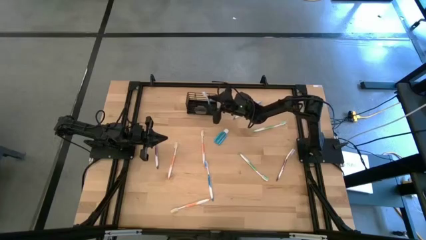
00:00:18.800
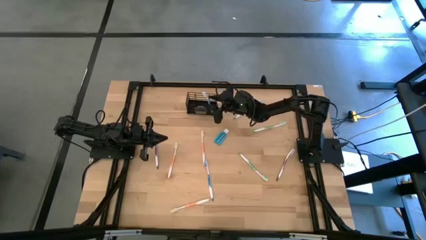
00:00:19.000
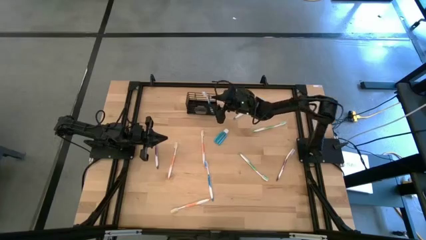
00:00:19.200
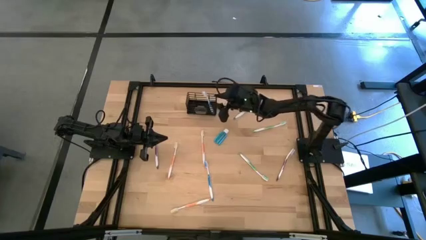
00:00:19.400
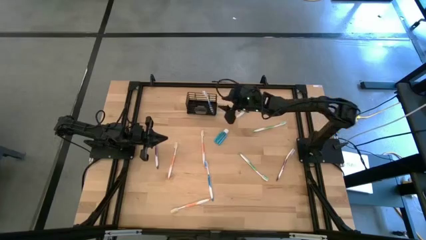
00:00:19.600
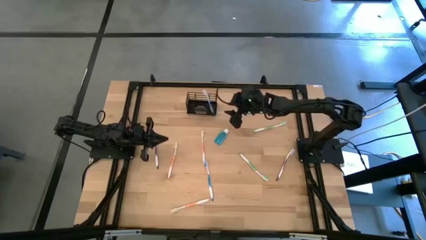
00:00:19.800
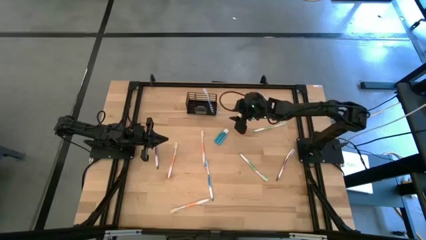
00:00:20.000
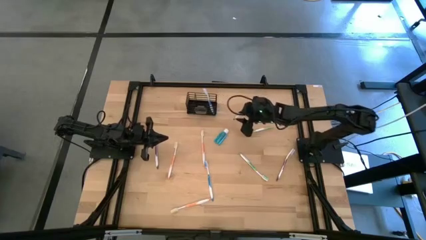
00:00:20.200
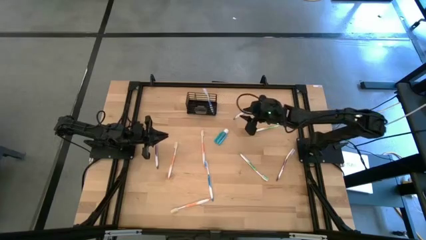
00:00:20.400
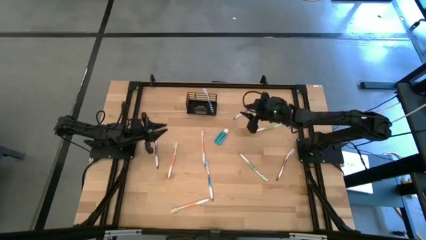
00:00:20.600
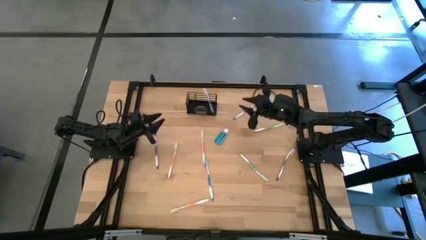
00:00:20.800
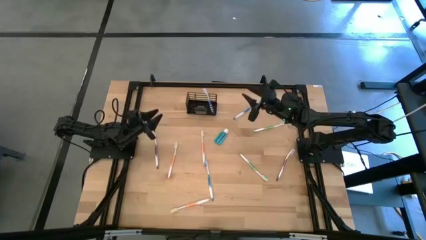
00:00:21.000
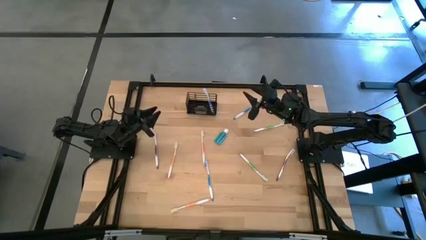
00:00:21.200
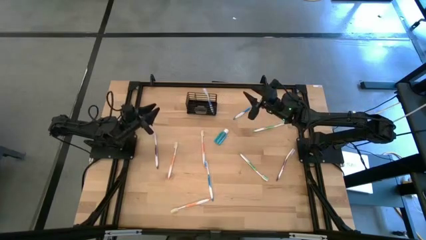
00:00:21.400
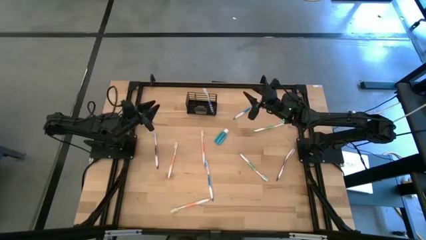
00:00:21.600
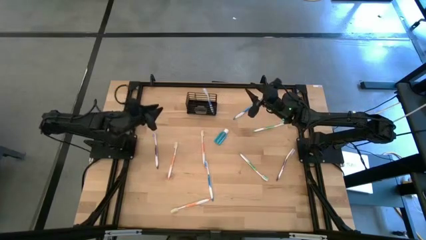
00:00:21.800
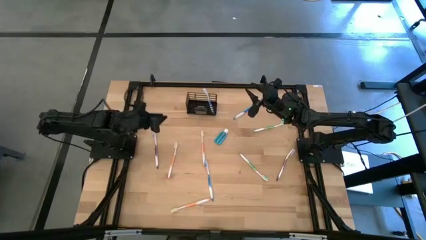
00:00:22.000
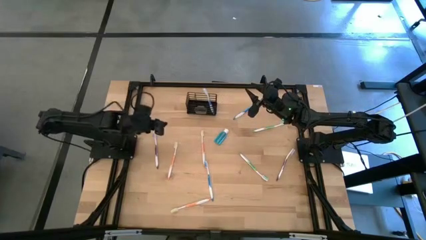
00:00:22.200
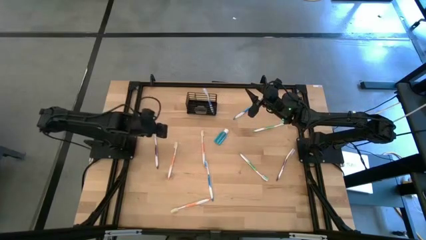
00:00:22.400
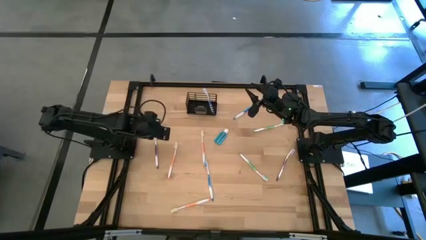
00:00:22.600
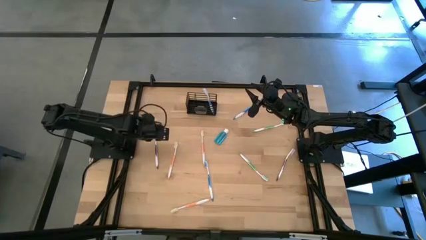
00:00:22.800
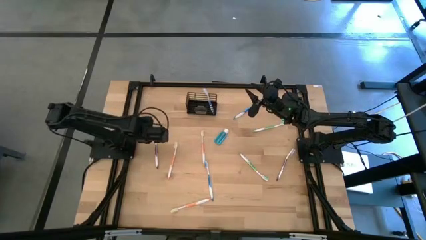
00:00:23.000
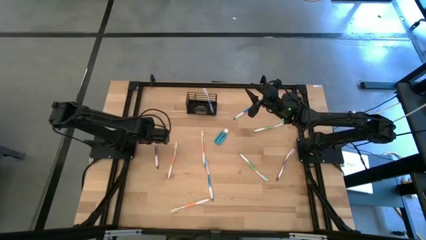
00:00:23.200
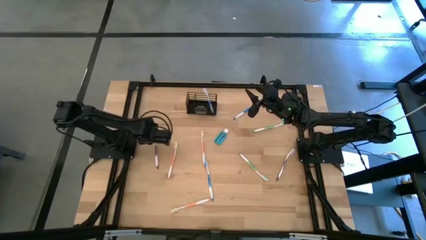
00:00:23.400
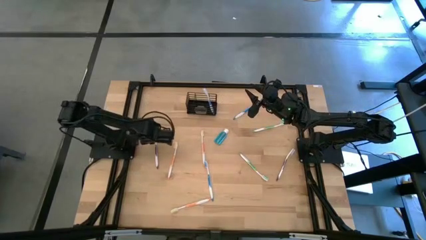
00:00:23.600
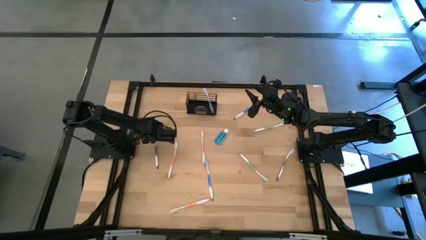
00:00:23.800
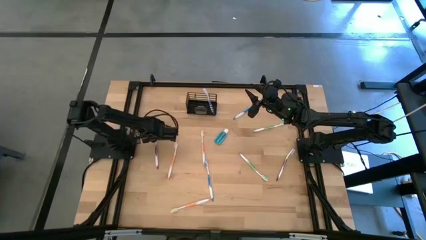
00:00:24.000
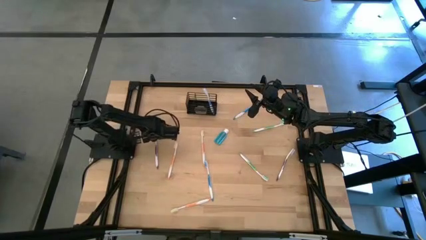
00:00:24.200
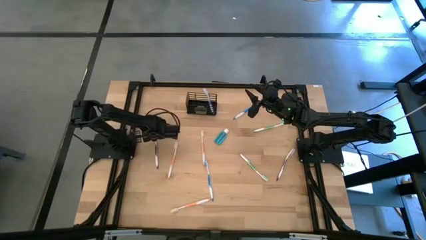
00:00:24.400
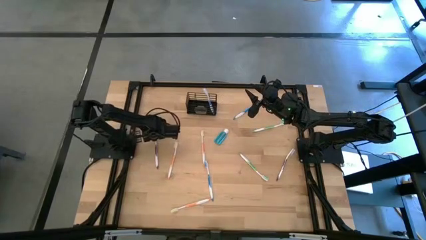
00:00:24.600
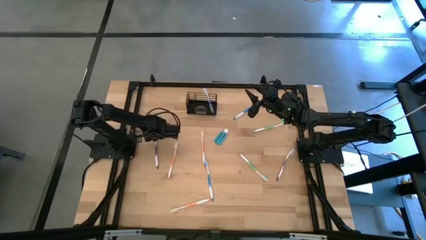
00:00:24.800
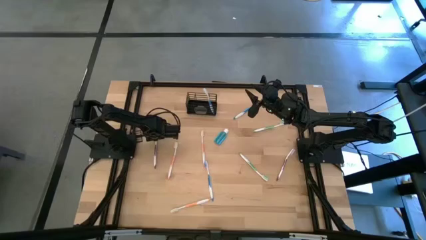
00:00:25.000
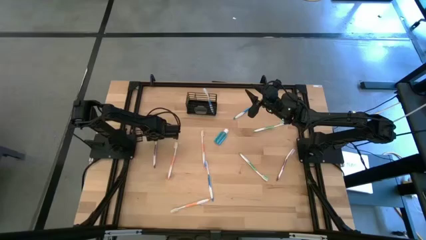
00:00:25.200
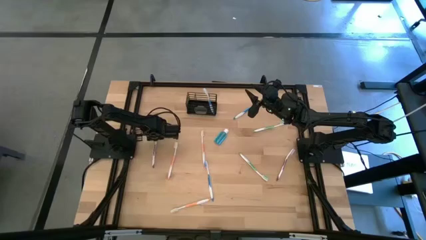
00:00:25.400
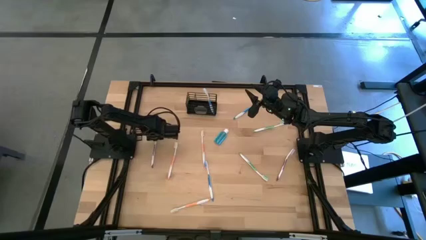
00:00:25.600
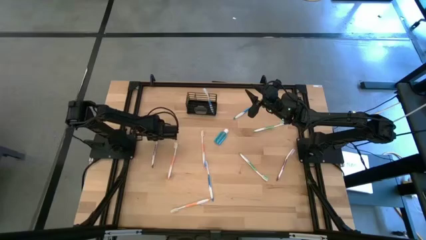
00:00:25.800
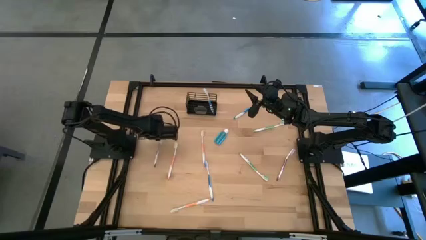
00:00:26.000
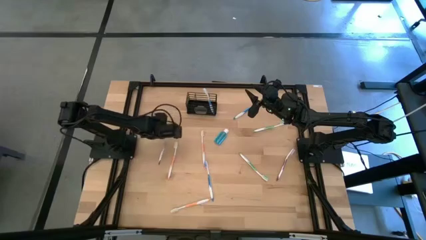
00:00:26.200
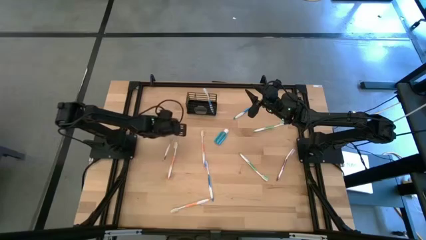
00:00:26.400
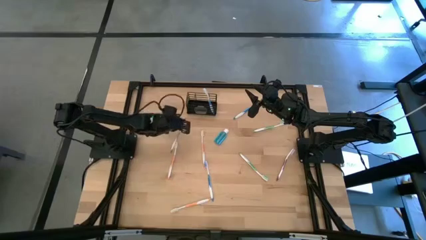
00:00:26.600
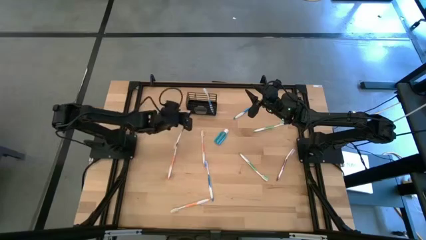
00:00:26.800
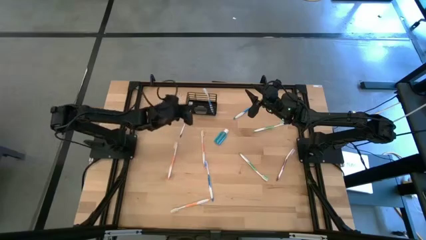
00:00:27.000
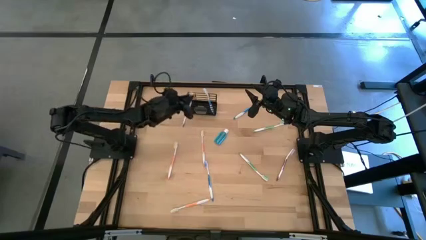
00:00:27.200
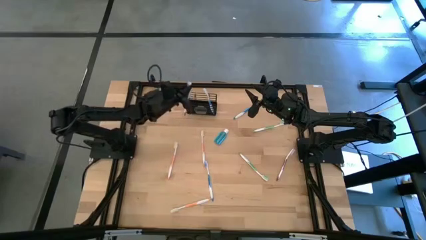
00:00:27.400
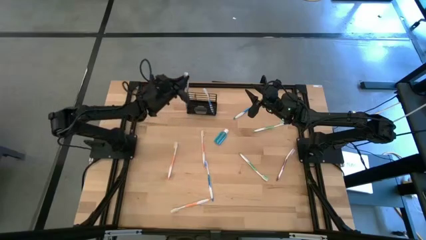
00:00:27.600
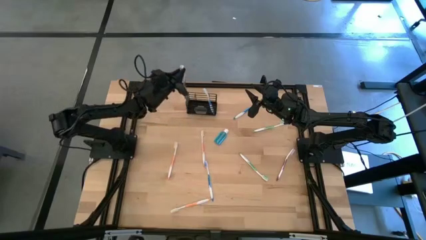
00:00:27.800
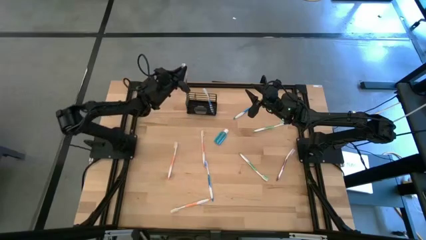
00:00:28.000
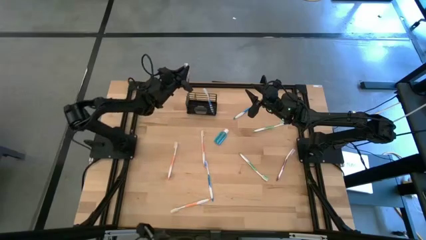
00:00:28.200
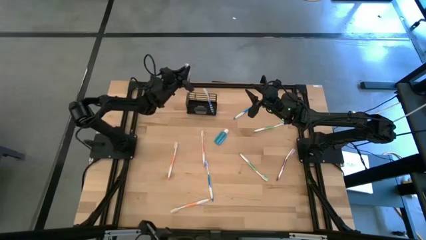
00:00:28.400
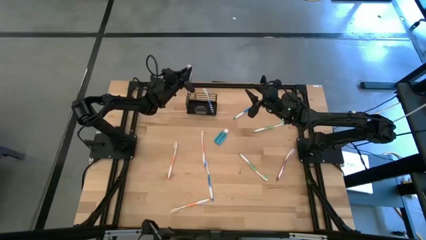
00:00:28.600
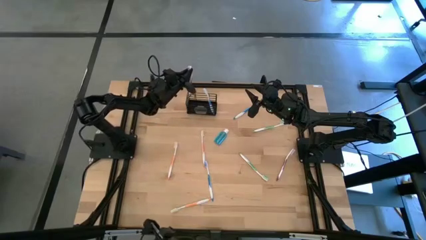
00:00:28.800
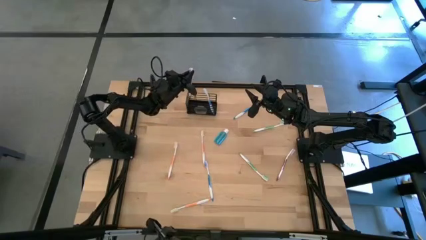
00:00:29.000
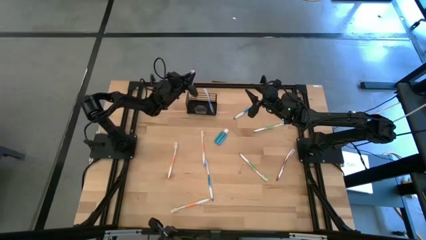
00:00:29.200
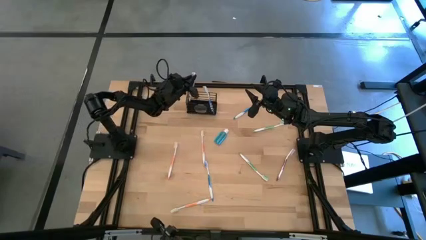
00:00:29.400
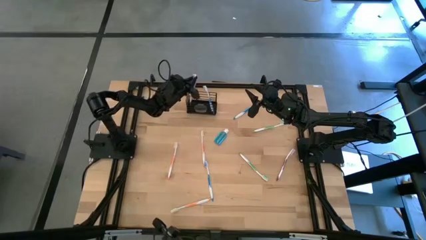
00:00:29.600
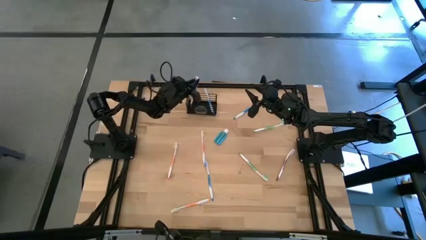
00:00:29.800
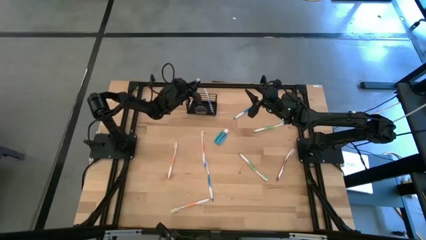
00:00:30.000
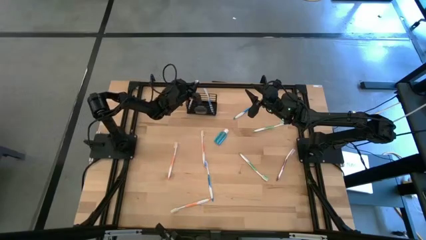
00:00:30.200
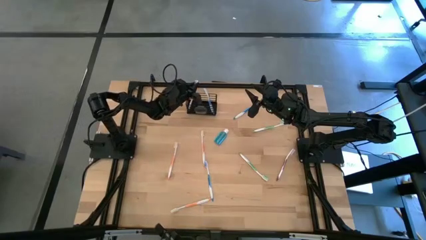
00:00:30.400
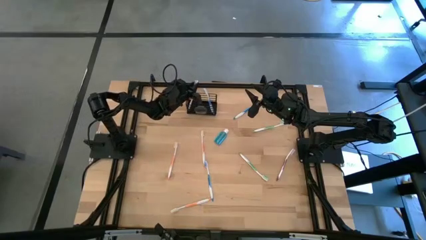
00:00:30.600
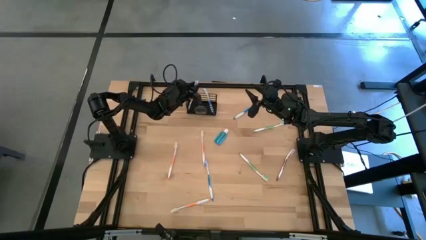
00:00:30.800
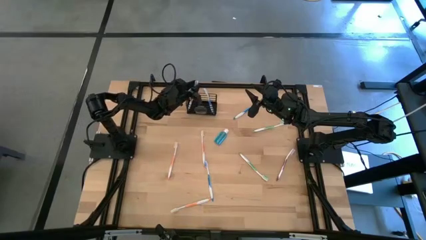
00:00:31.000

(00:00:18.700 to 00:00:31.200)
Task: Pick & Place toothbrushing station
Put the left purple toothbrush into the black wire organizer
